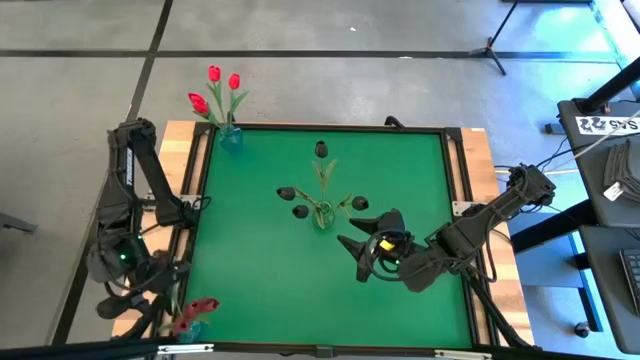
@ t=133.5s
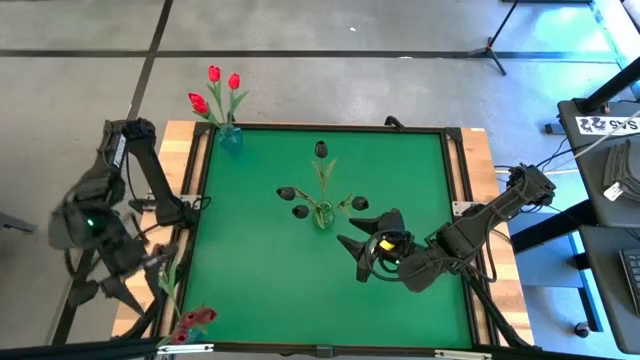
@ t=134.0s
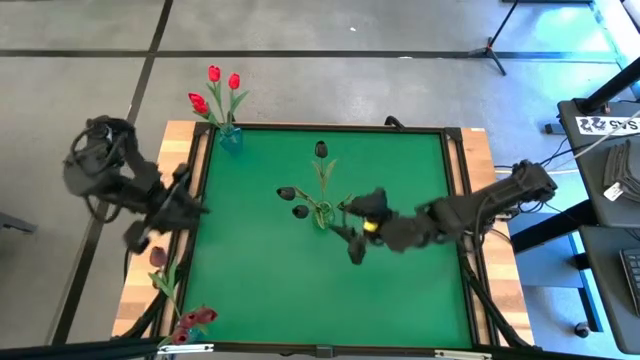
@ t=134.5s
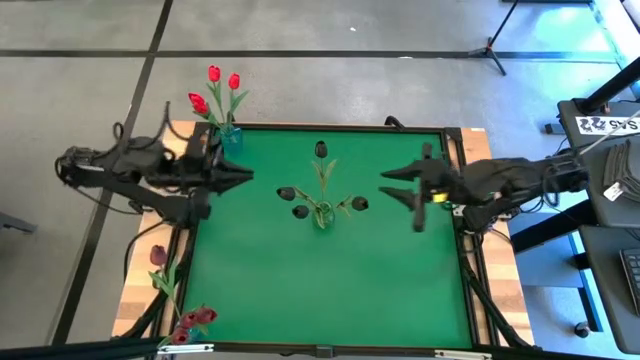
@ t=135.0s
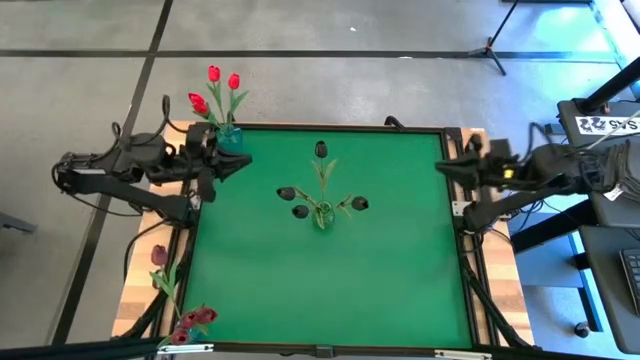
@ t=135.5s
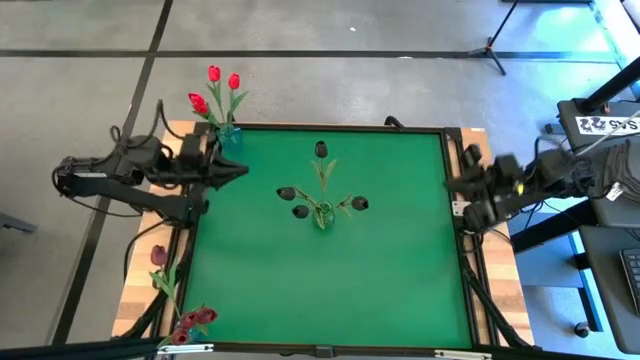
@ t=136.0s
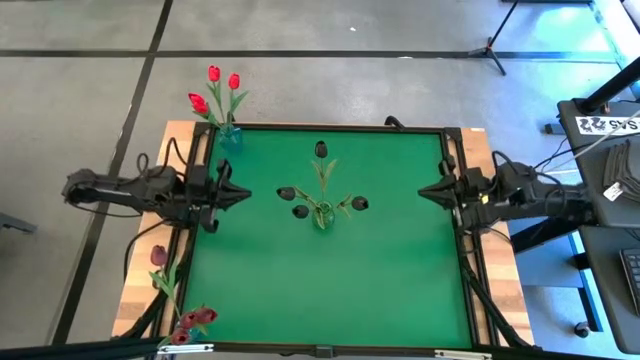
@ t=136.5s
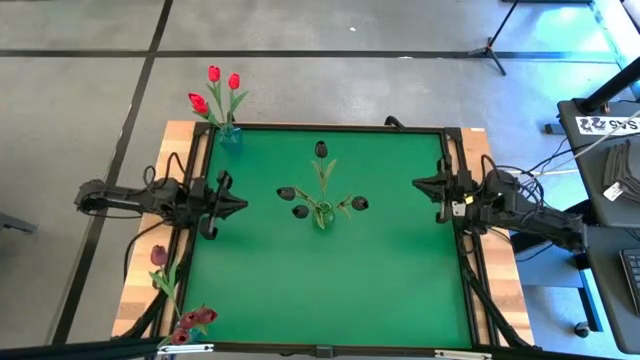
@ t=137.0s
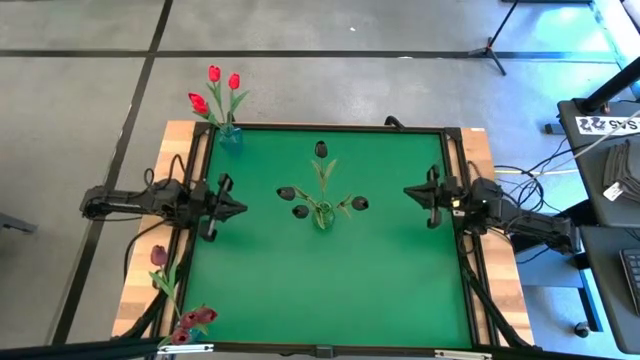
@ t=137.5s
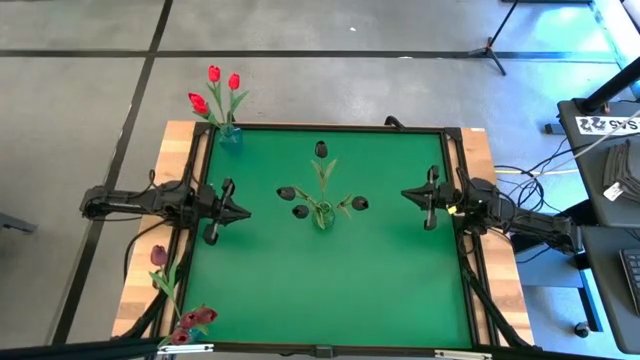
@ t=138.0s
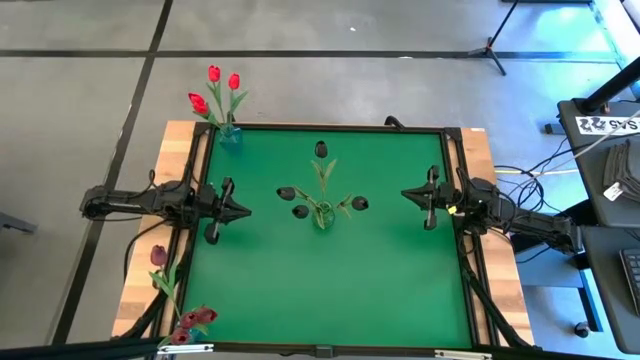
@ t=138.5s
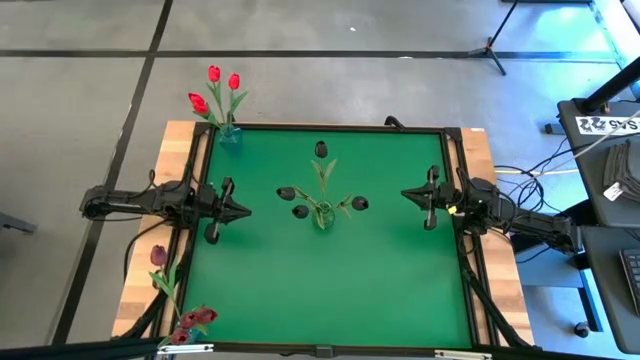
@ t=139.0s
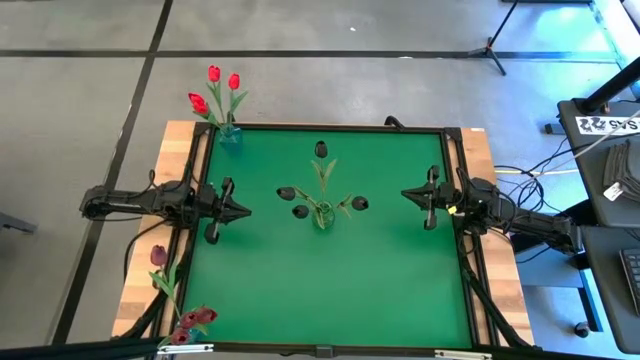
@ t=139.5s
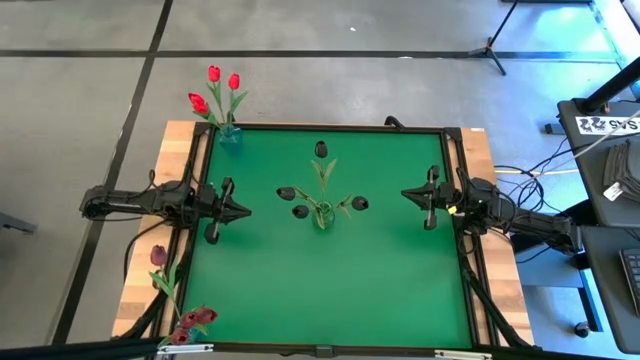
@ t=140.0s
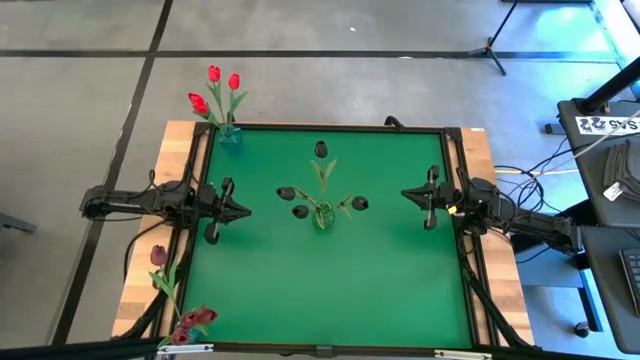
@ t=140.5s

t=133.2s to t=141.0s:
Task: Sort flowers into vase by color
Return to Home Position

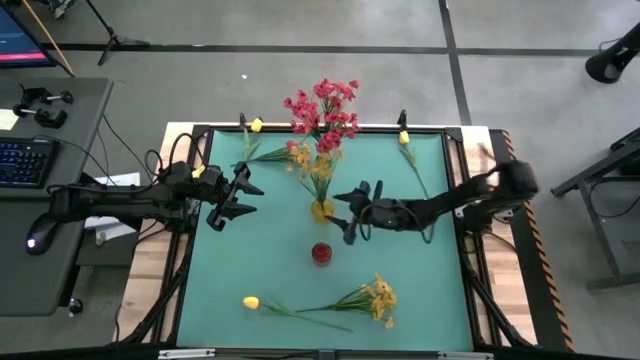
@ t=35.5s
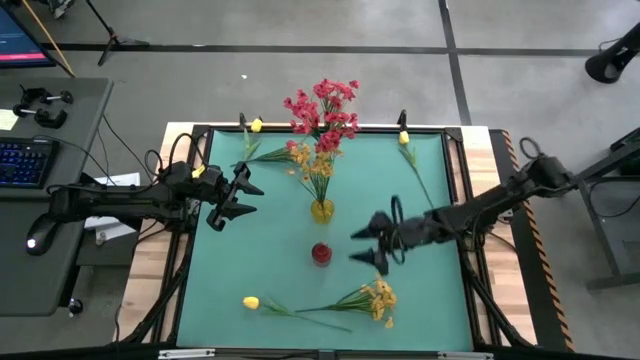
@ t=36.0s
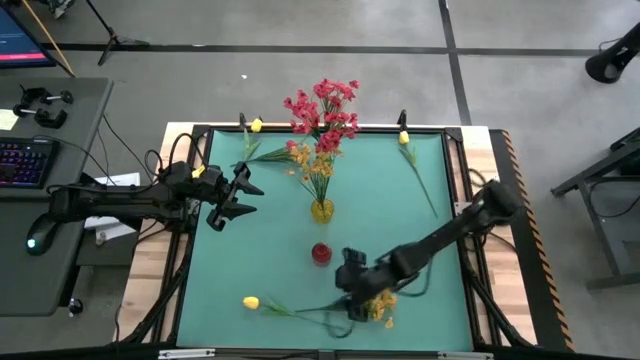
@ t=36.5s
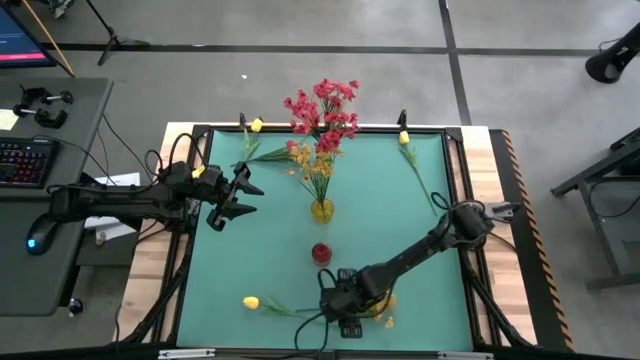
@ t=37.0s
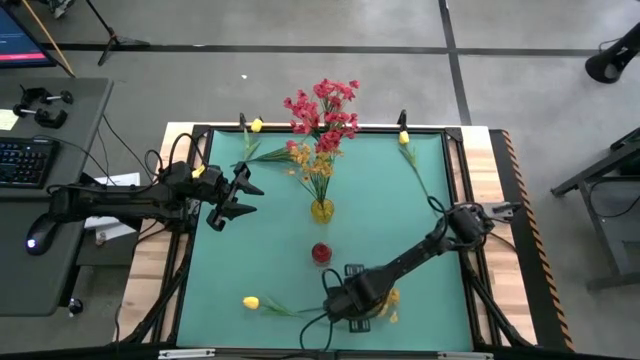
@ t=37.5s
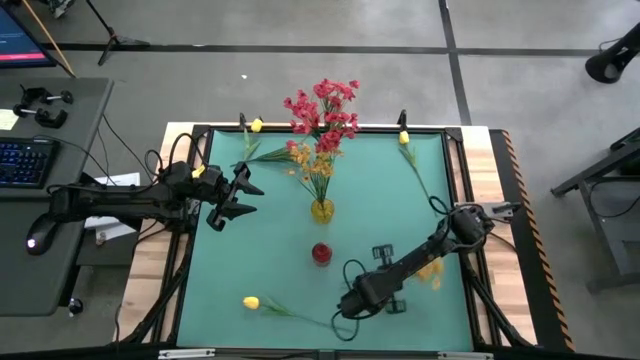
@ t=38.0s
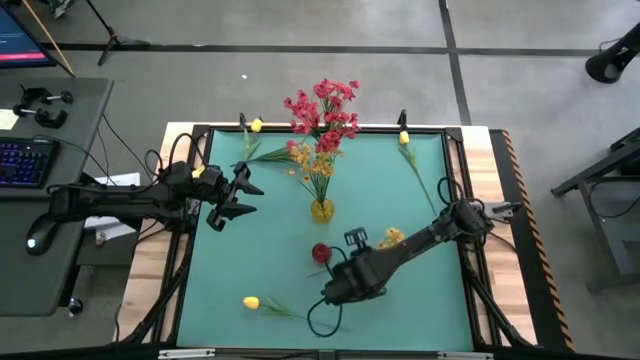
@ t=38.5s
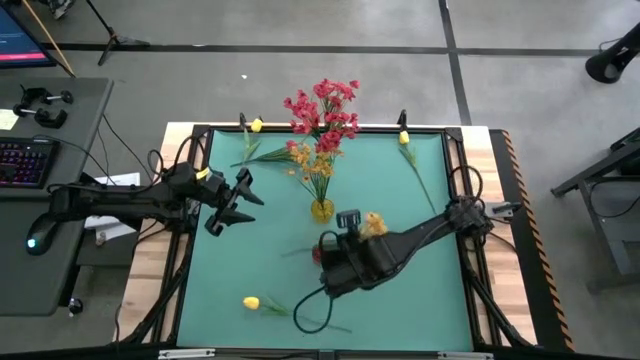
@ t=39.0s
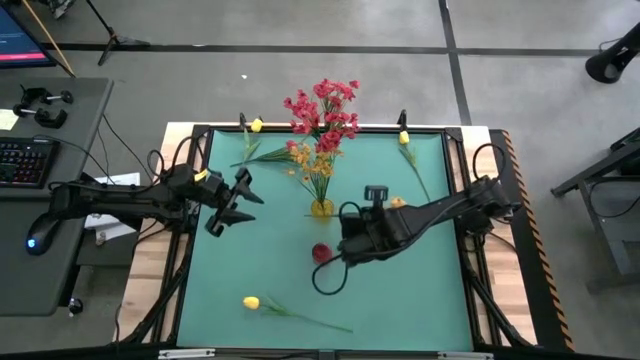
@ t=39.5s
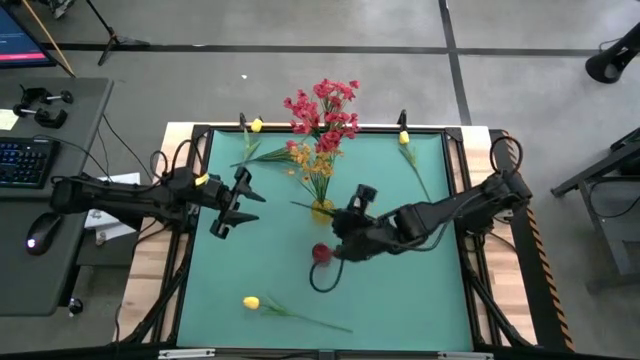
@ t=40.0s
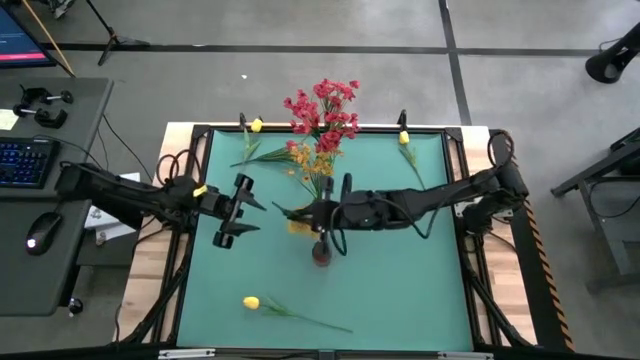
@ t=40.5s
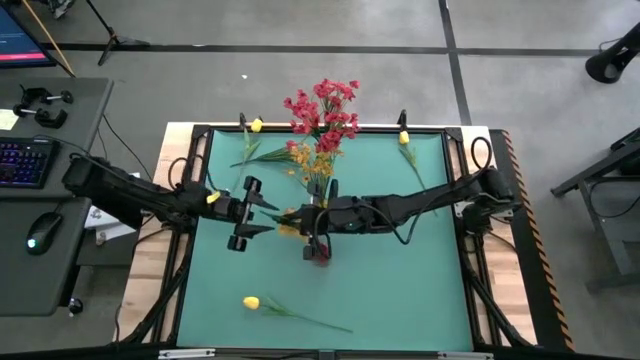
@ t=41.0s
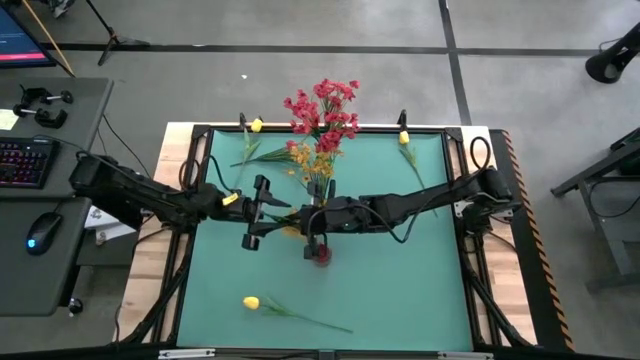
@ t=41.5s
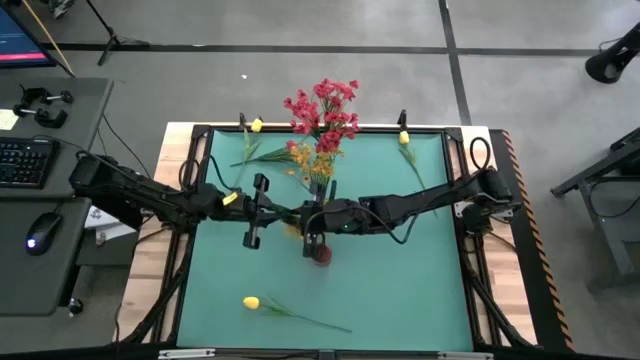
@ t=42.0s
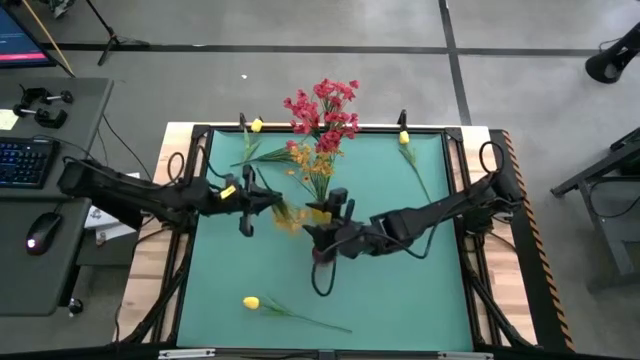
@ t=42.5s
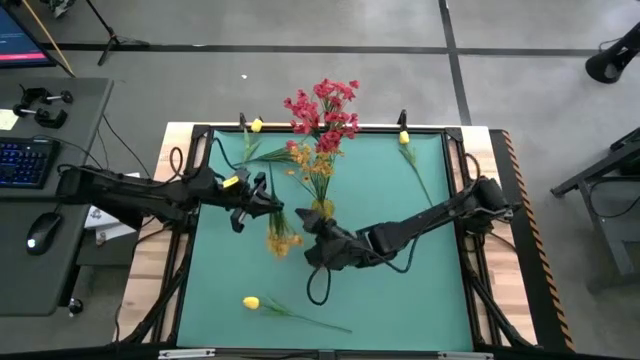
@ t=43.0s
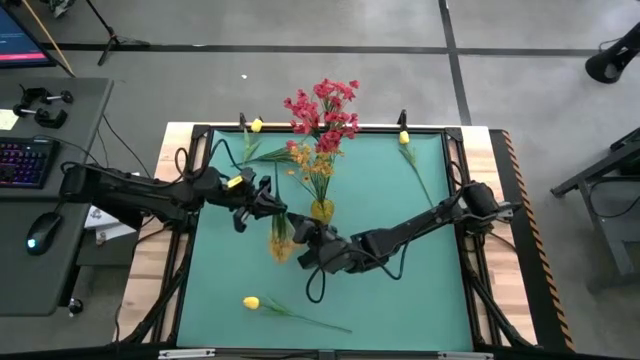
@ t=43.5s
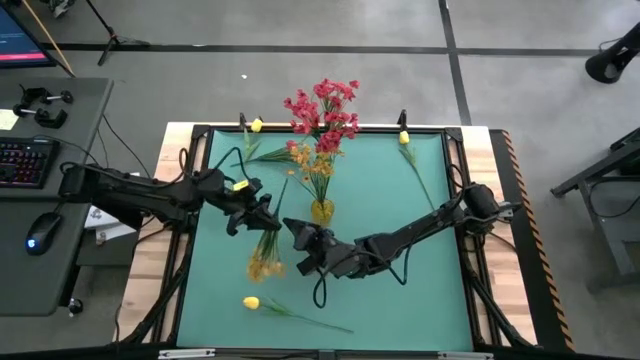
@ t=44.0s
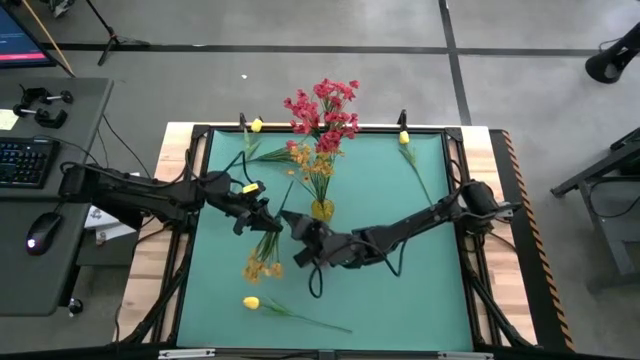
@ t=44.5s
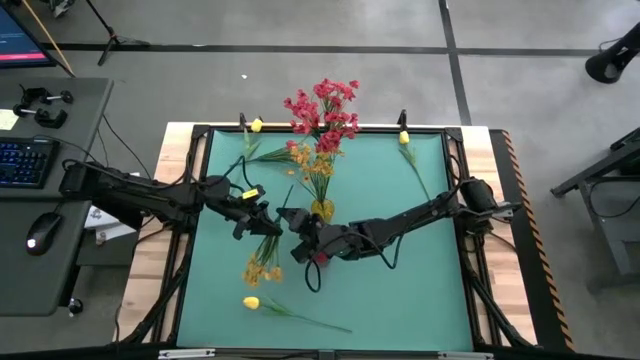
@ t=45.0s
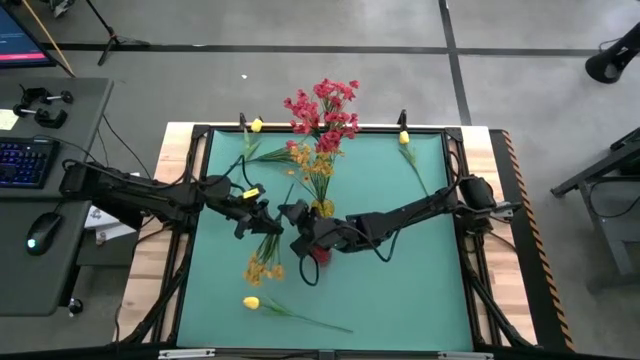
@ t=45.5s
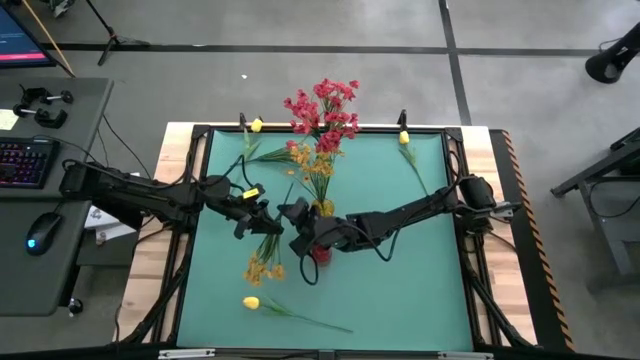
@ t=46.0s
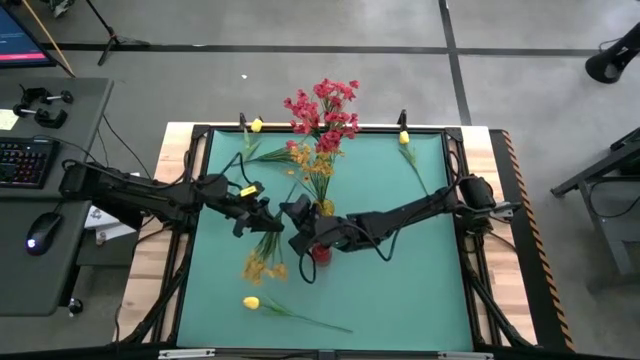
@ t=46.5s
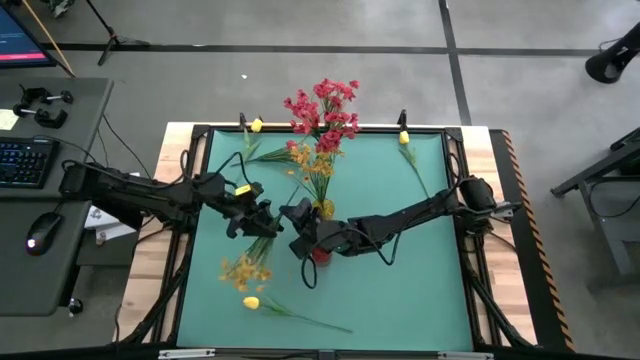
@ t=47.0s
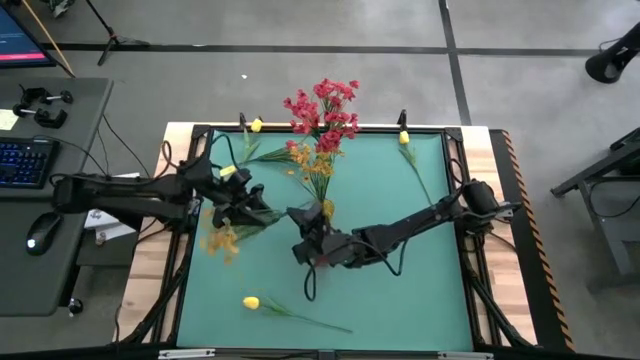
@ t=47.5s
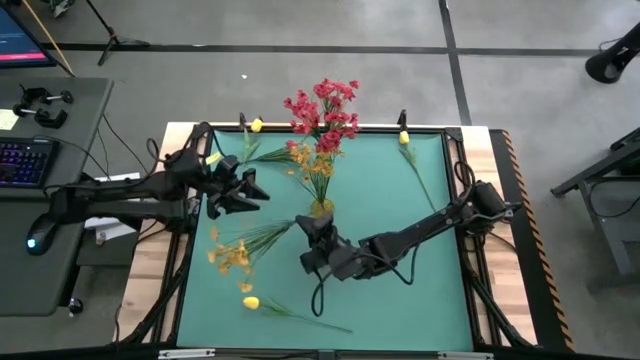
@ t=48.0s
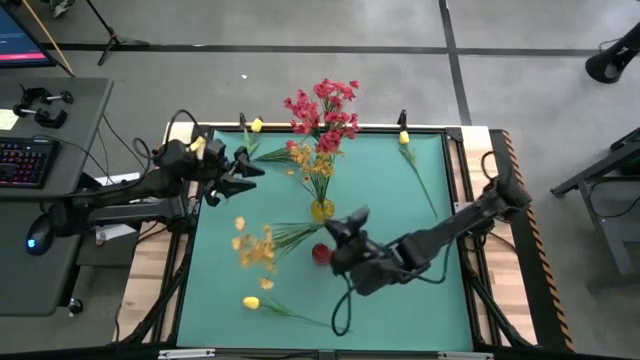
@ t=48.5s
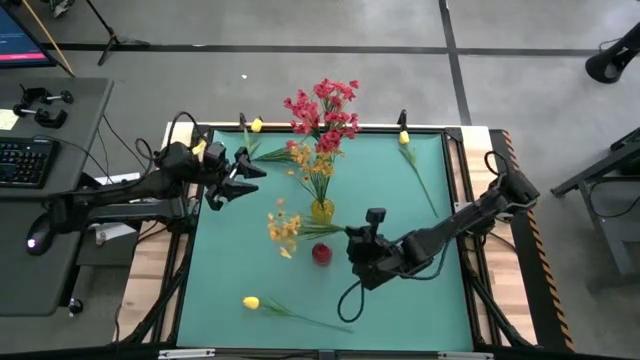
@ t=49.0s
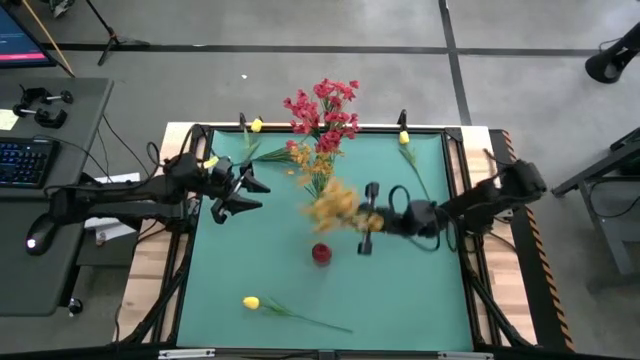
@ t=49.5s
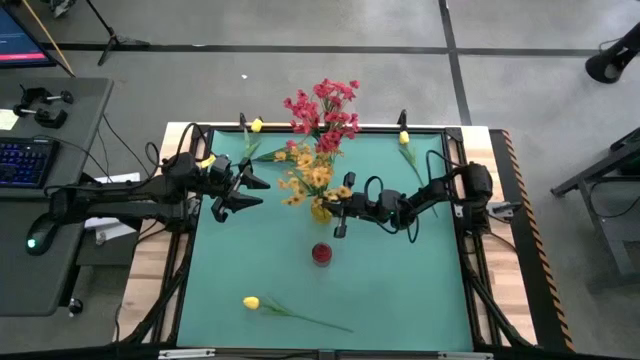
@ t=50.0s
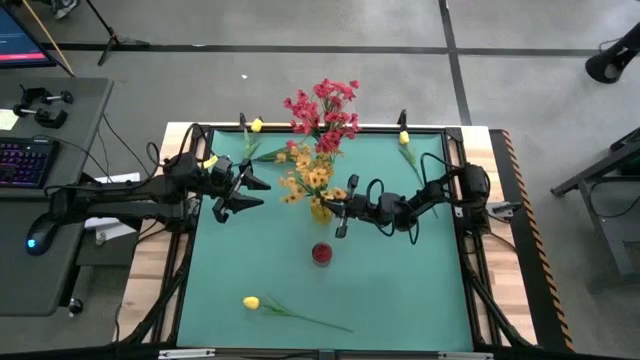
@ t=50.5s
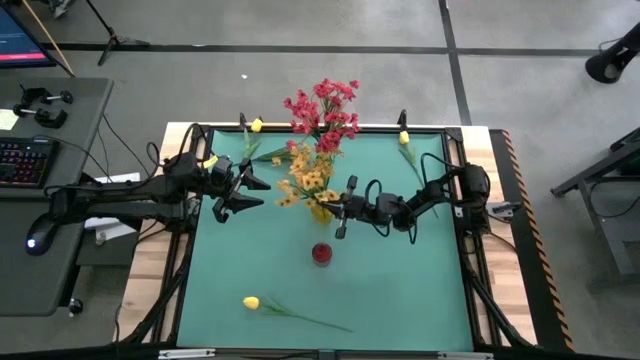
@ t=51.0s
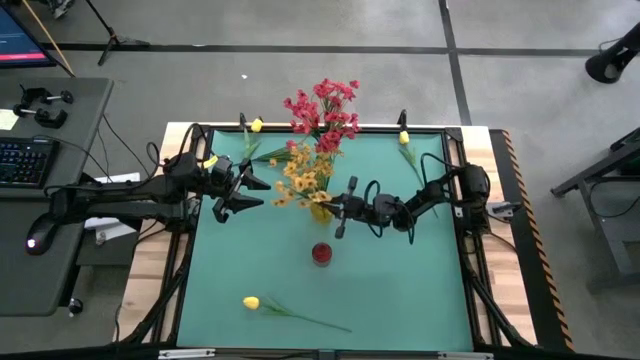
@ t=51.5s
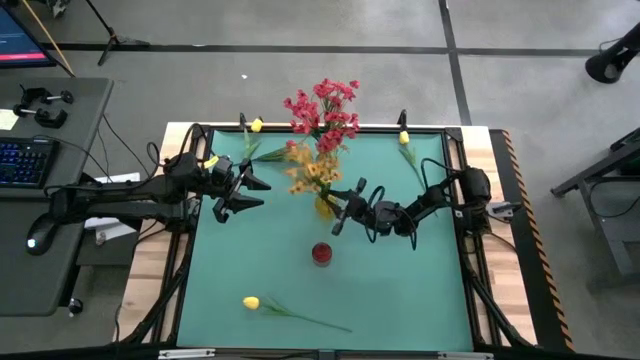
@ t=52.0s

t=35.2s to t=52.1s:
Task: Sort flowers into vase by color
Put the bottom yellow flowers into the yellow vase
